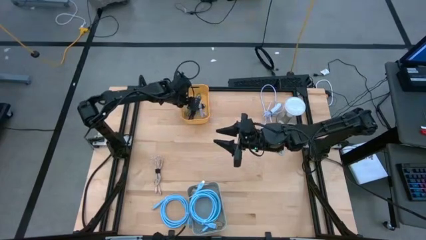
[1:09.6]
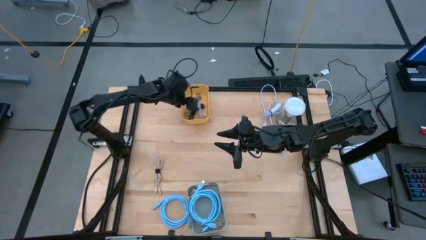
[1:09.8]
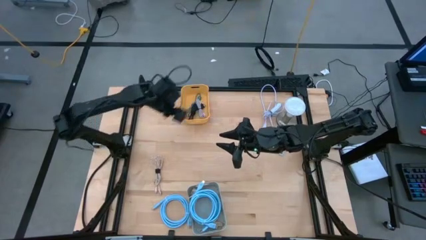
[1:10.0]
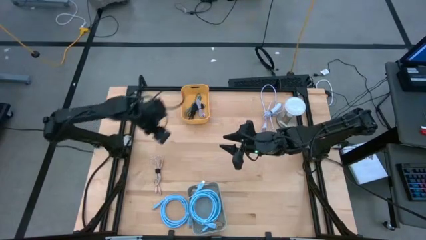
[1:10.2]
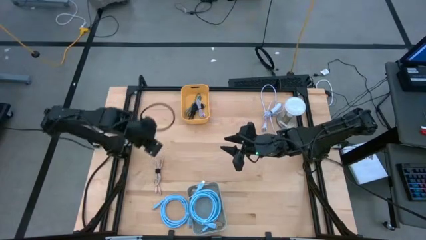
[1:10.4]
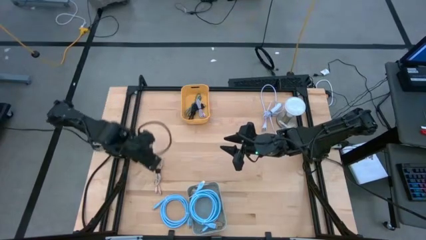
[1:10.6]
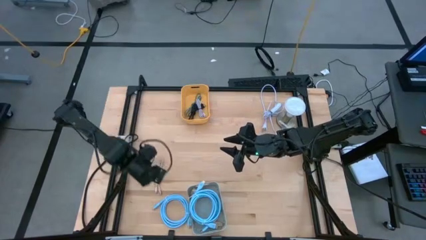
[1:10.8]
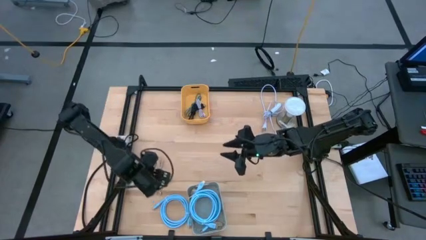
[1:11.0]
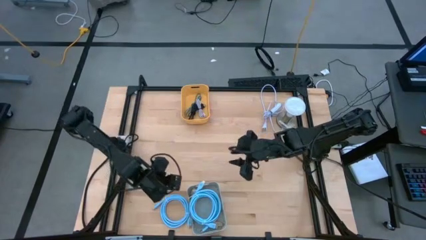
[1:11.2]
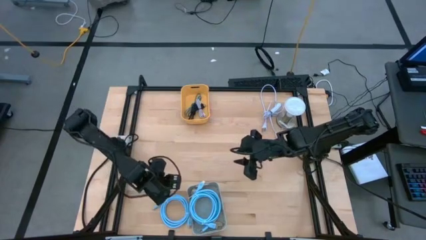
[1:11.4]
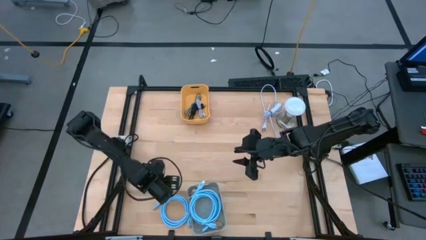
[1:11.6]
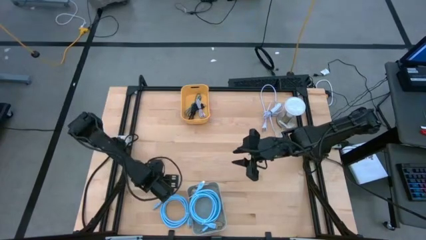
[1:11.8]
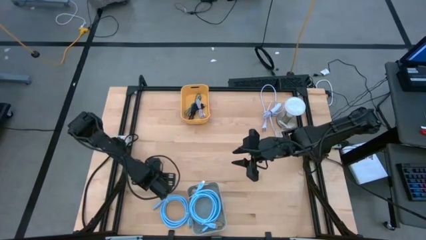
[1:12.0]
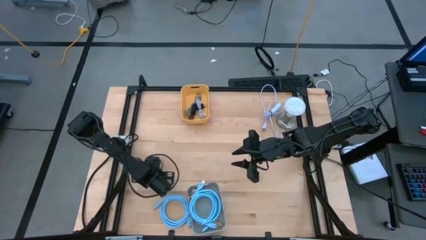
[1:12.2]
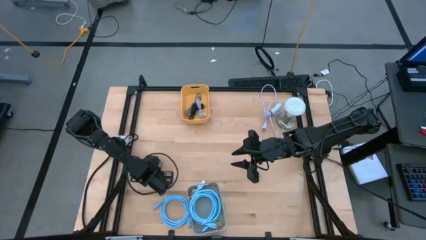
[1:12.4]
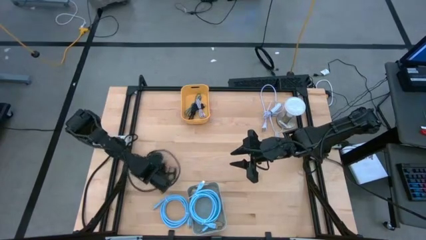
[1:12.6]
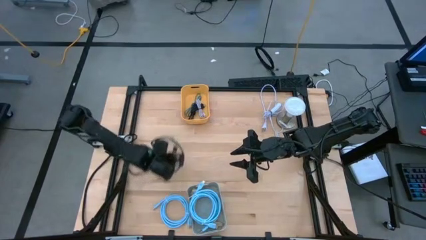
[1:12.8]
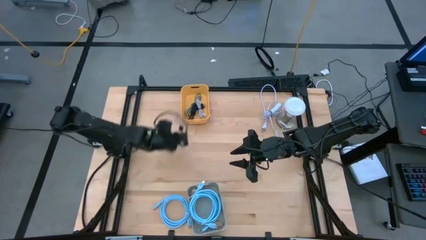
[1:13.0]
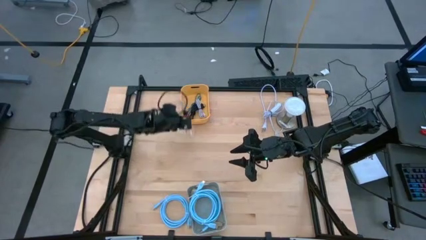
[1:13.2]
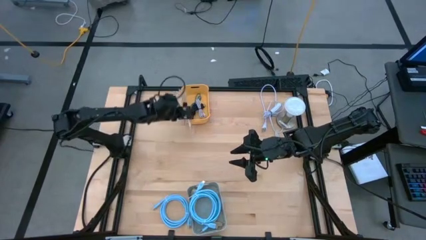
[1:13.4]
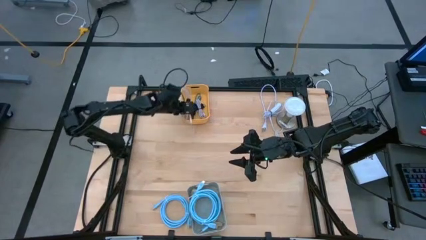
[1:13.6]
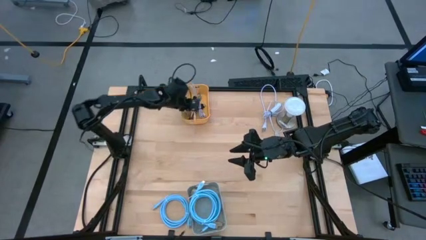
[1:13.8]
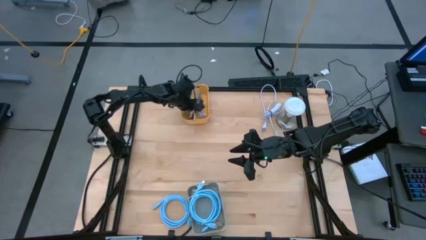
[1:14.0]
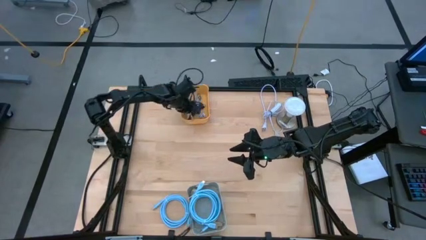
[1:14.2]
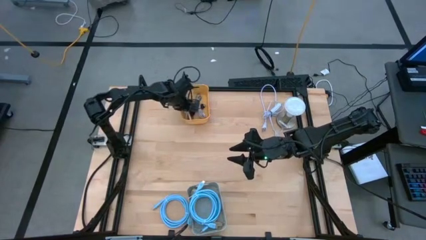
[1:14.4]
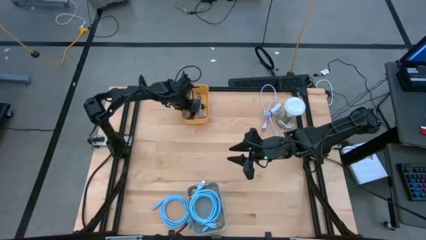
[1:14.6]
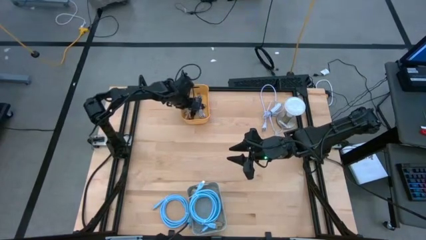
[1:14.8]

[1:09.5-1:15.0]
Task: Pick & Place USB Port
Put the brown charger cable into the yellow bin

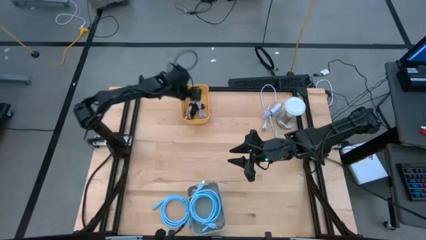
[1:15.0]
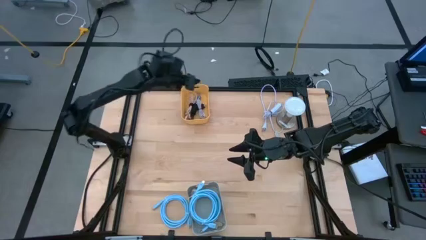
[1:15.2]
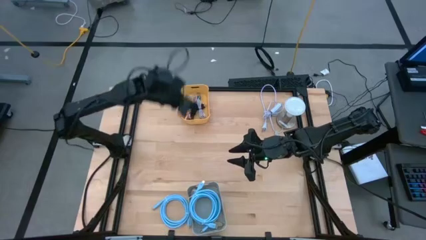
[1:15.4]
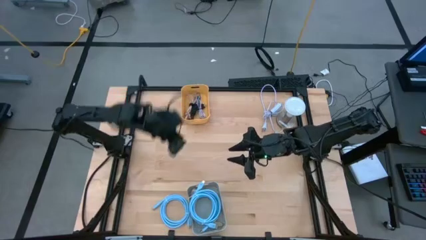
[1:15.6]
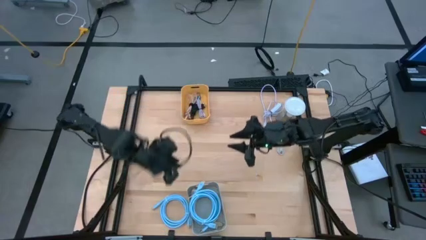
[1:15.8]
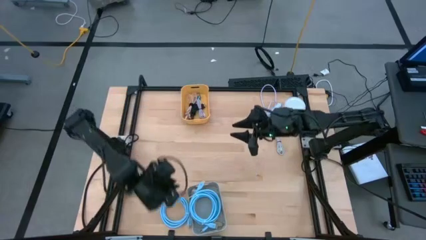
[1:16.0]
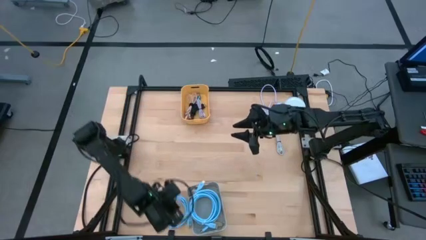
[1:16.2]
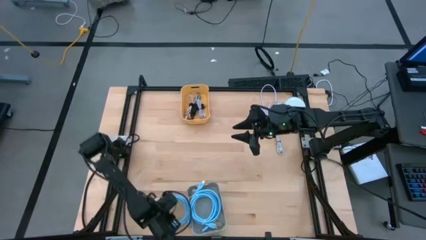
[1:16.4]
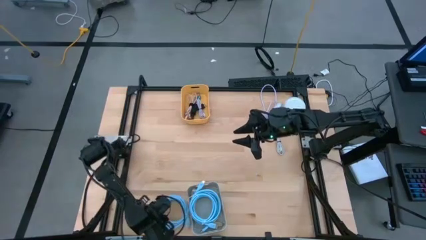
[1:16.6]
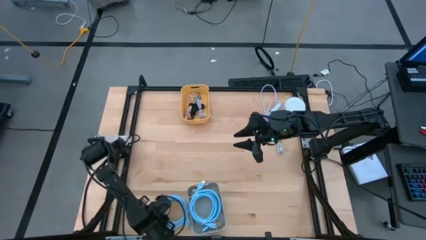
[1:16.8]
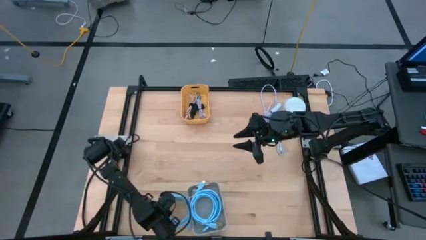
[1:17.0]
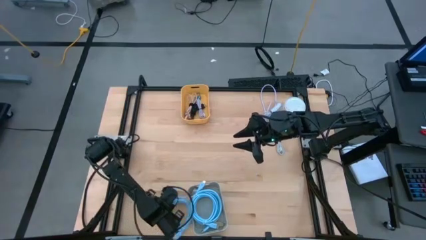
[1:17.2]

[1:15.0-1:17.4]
Put the blue video cable into the gray bin

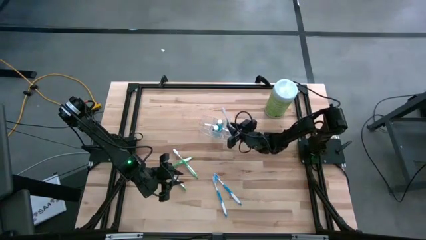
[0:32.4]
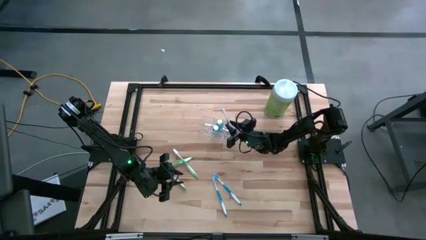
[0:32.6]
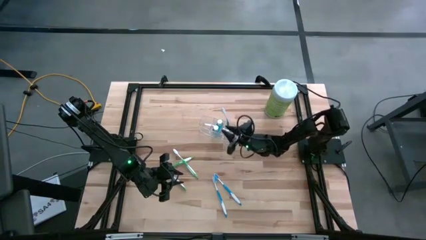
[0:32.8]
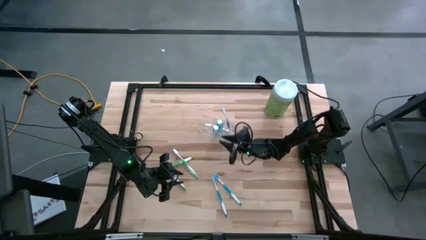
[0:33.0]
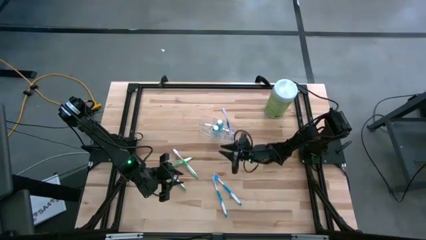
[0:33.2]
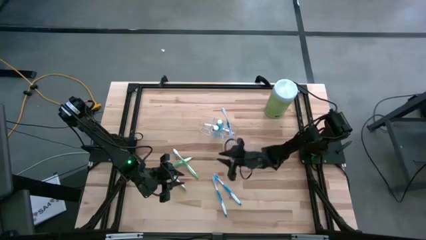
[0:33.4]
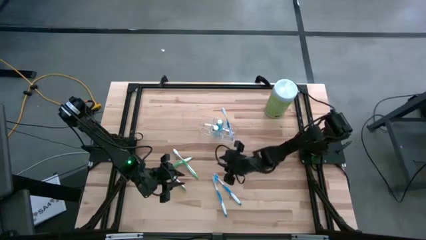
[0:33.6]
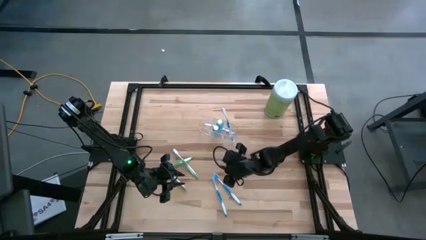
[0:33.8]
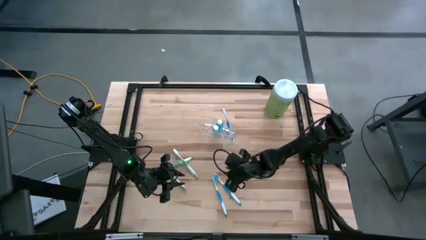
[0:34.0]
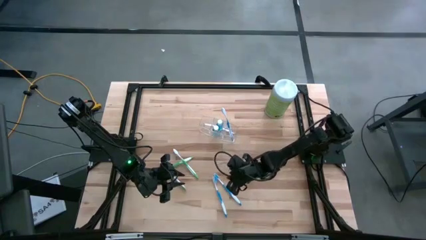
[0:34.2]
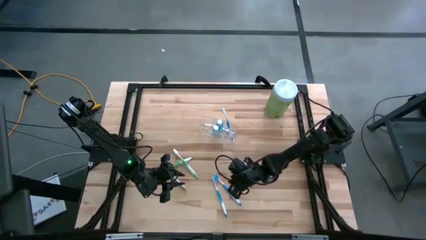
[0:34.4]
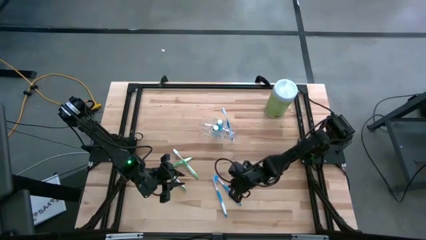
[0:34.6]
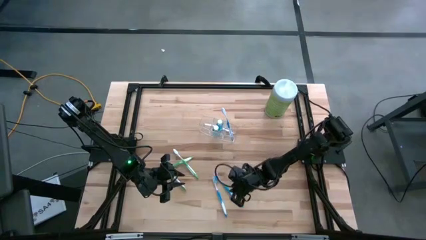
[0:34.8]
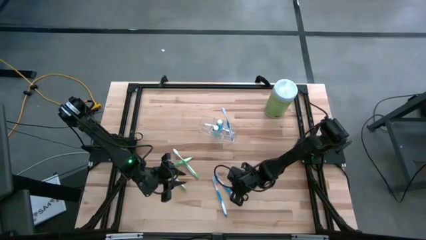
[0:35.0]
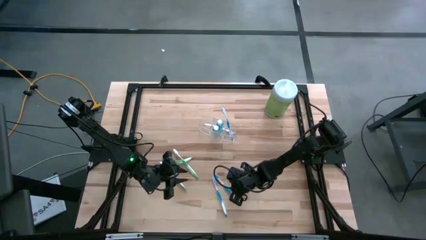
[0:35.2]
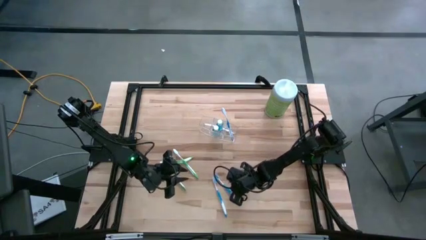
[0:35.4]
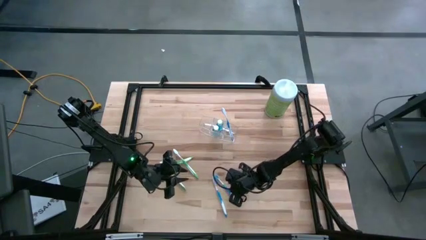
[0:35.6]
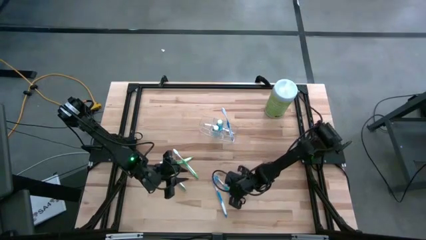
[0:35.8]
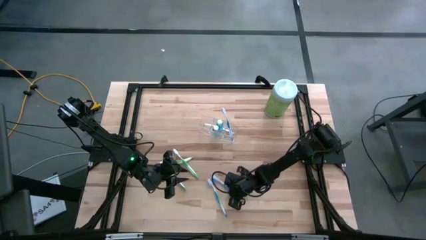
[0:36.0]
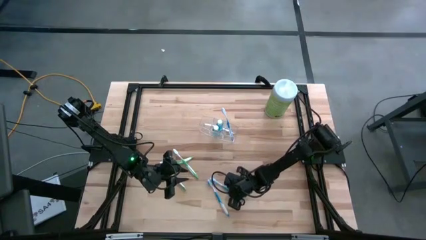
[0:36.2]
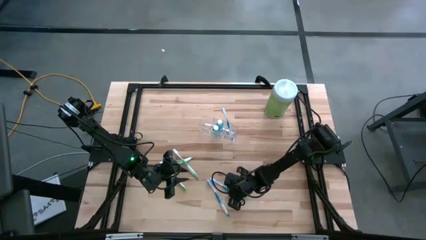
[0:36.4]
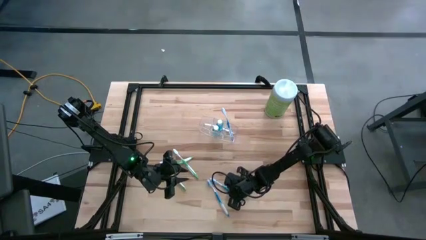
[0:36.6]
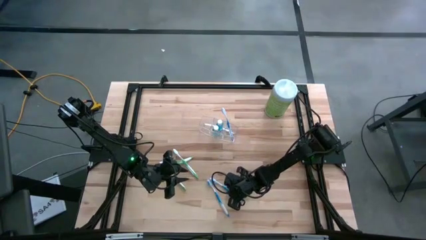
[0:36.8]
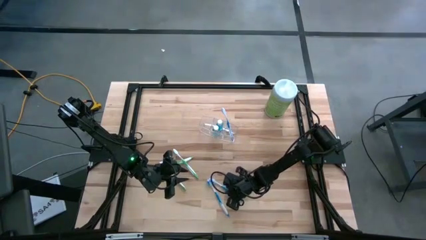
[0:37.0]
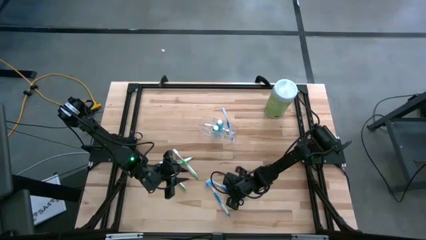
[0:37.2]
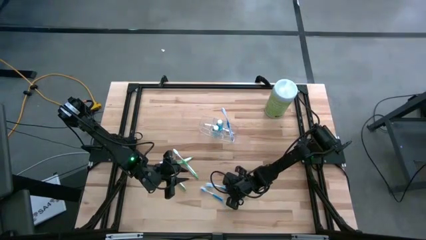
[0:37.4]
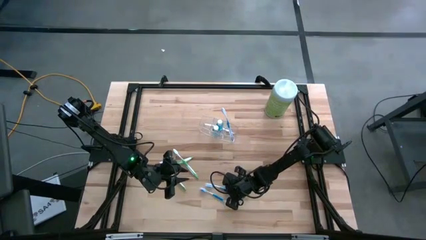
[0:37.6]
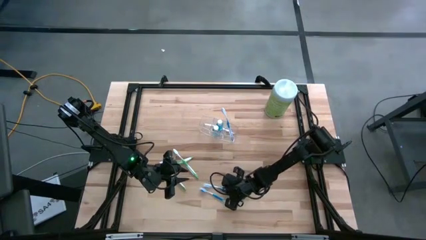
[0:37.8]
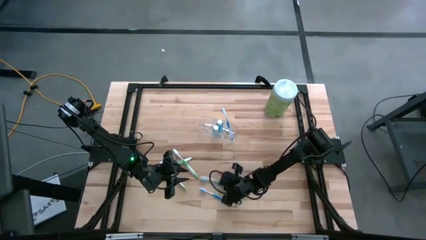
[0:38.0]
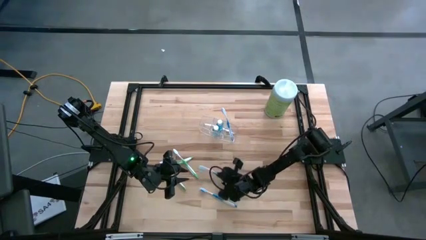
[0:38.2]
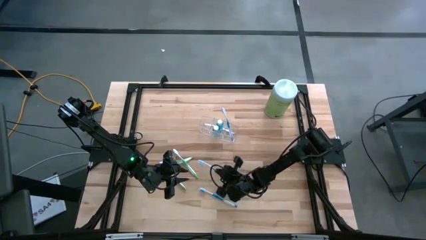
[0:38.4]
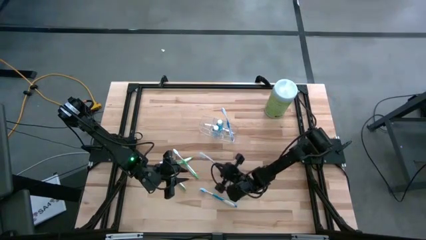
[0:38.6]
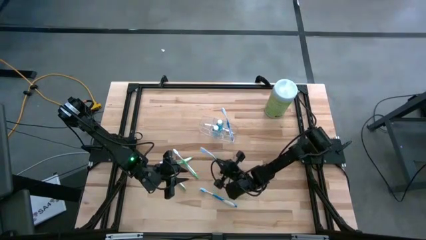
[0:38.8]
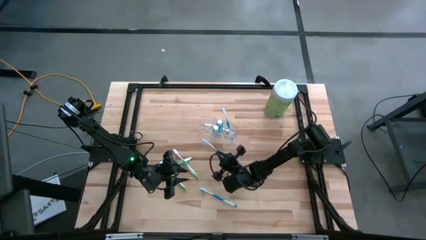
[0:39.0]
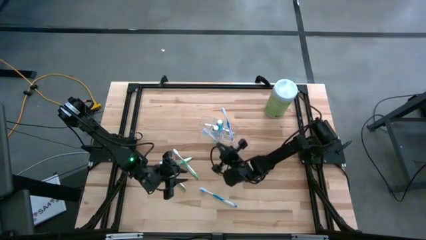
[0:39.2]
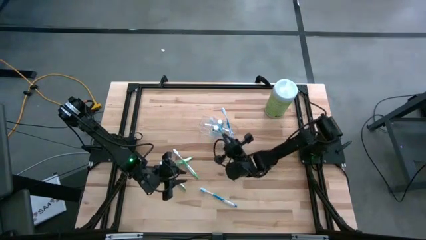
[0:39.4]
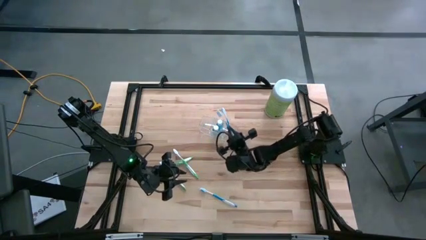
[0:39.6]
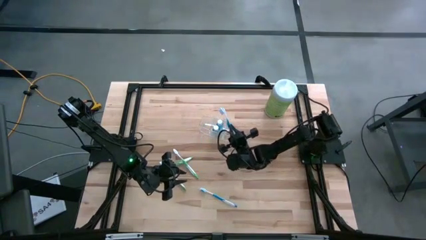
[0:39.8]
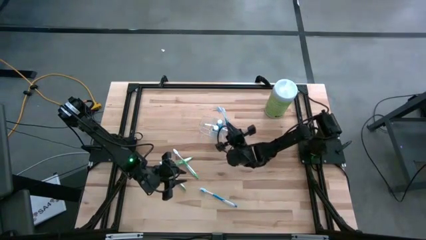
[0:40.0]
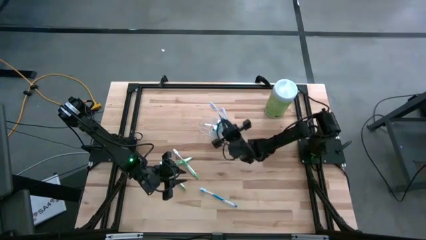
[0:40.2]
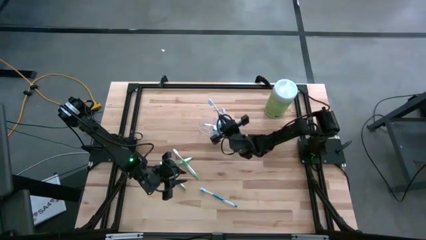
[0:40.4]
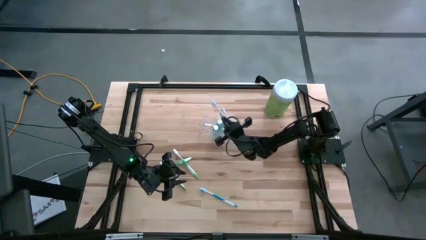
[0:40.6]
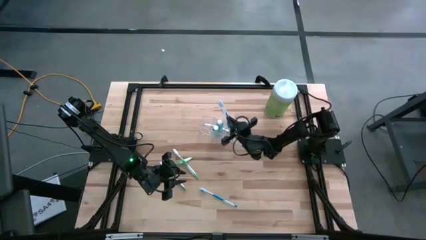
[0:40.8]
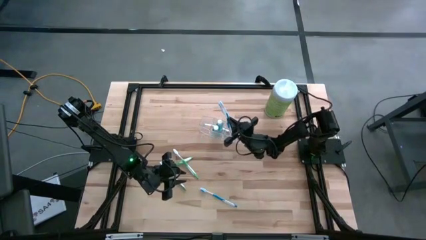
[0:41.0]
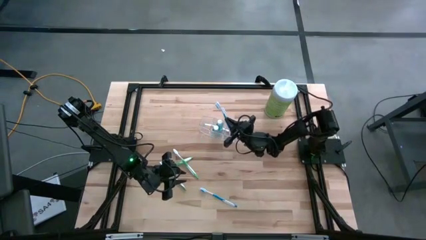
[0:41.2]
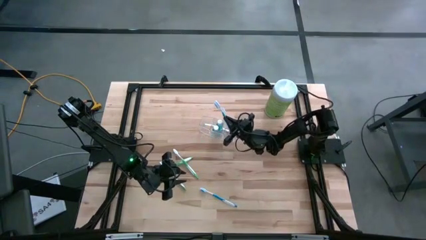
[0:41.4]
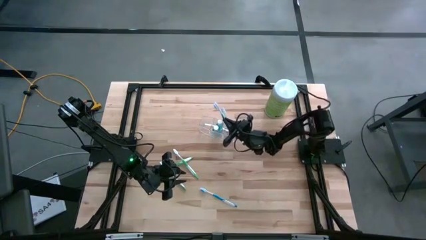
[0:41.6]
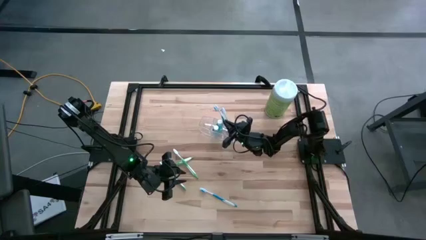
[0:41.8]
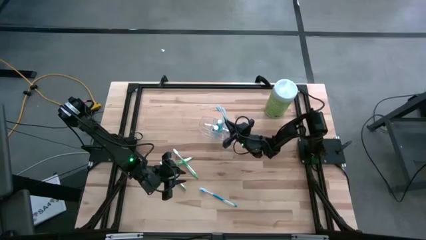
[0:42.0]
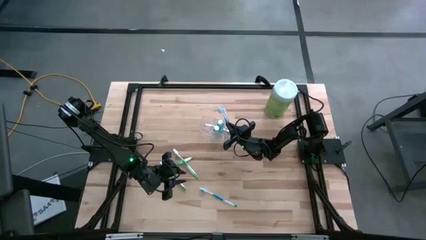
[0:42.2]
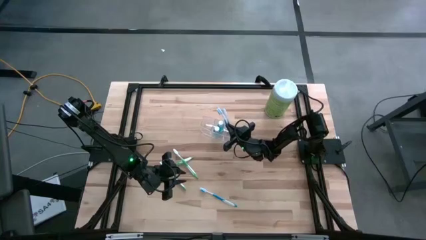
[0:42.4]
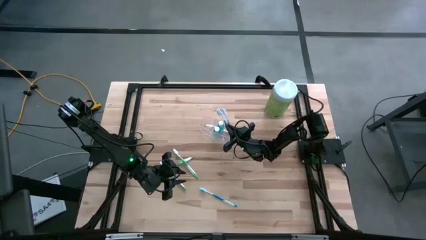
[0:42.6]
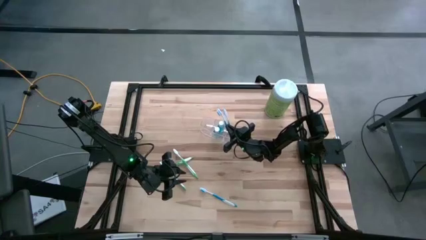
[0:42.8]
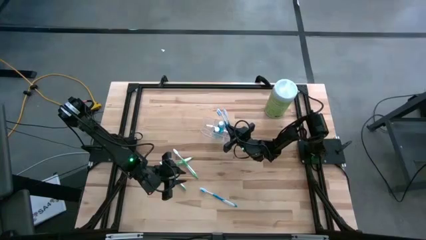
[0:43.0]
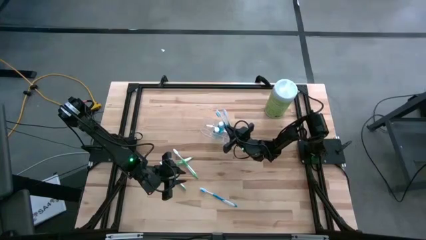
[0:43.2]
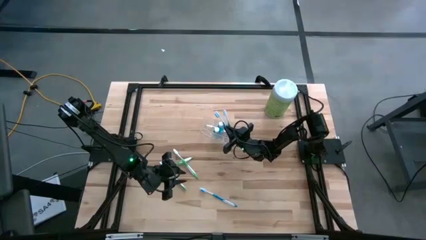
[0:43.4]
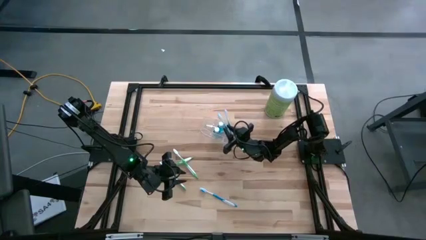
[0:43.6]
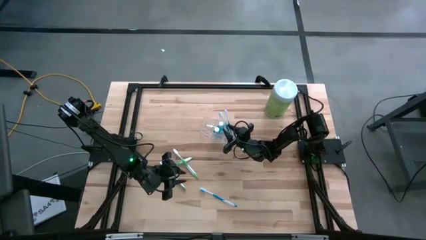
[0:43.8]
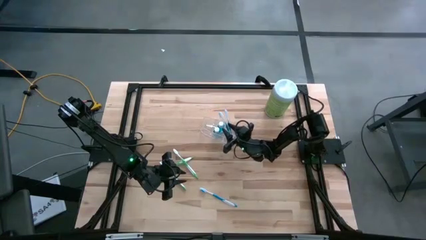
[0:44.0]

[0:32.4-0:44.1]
Task: Pick & Place toothbrushing station
Put the top blue toothbrush into the transparent organizer
